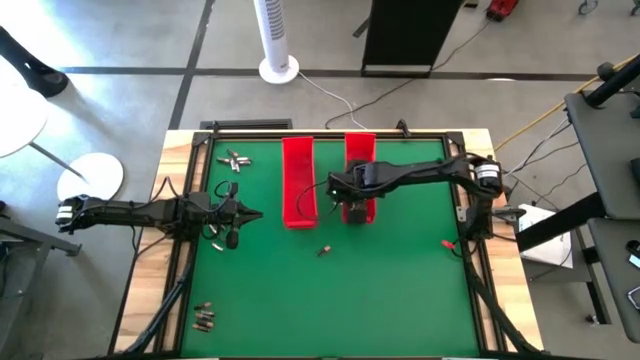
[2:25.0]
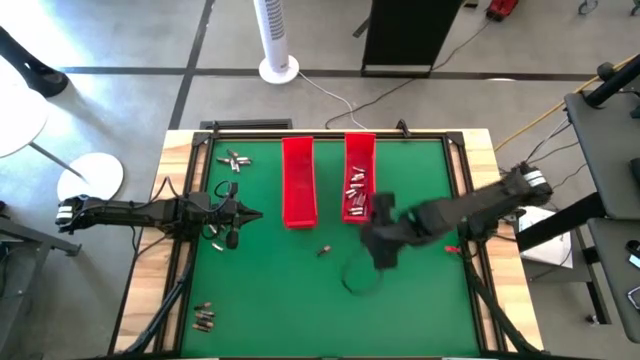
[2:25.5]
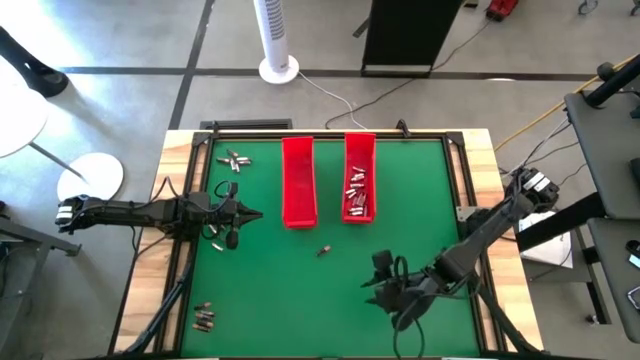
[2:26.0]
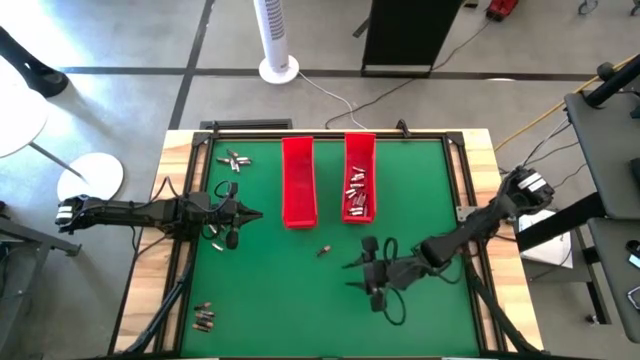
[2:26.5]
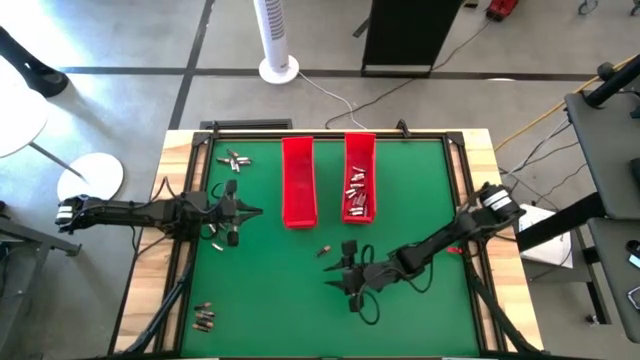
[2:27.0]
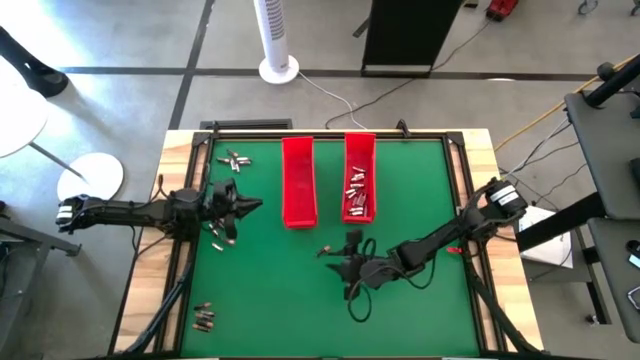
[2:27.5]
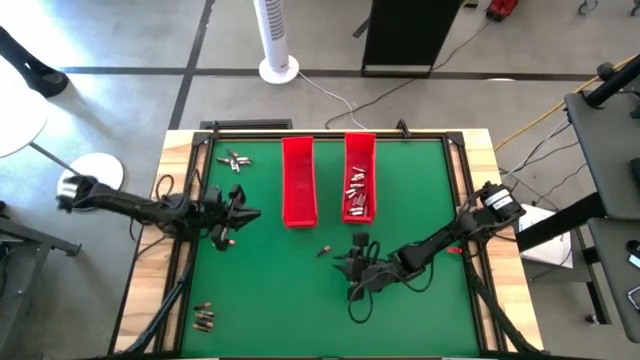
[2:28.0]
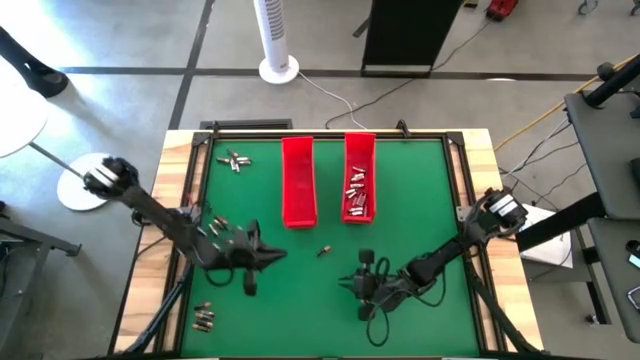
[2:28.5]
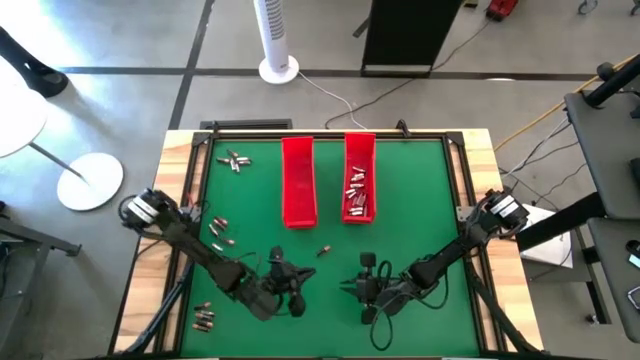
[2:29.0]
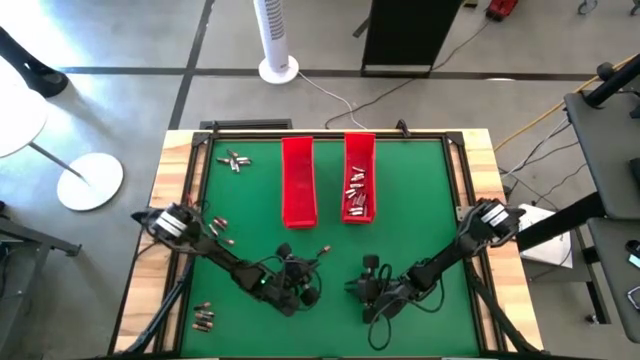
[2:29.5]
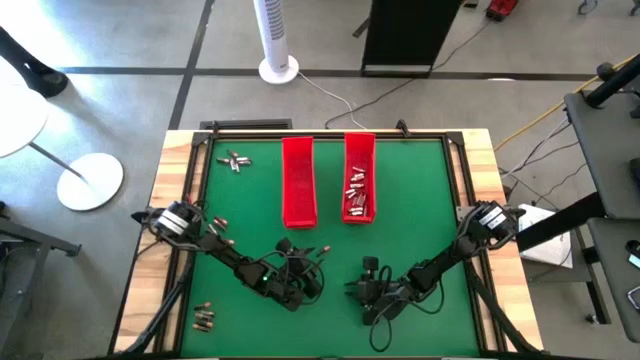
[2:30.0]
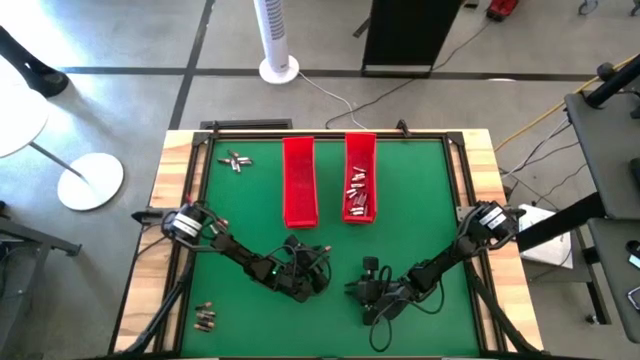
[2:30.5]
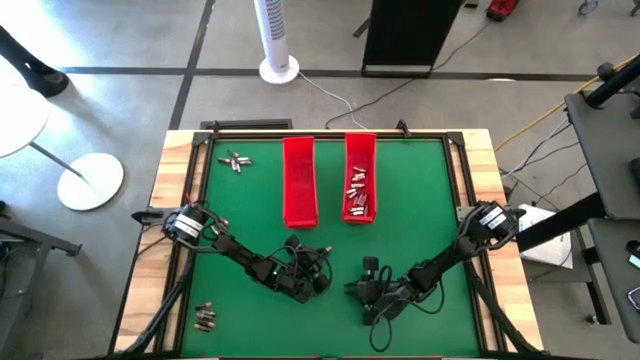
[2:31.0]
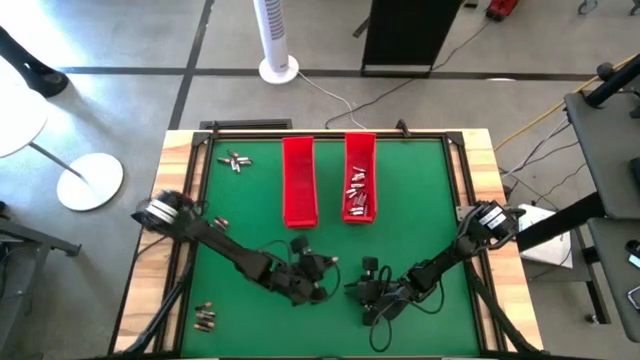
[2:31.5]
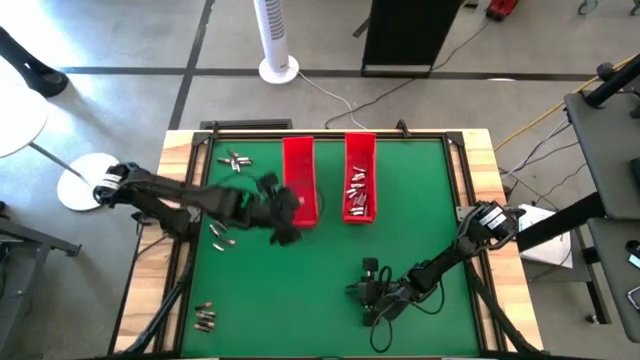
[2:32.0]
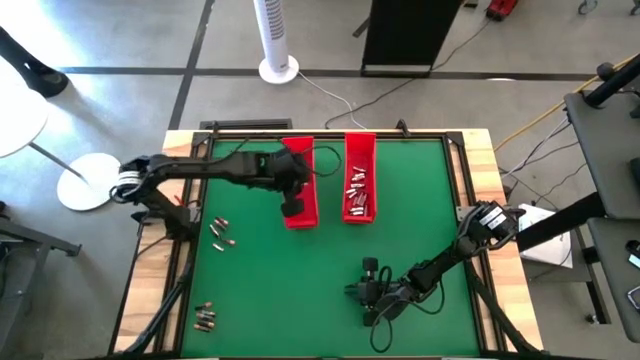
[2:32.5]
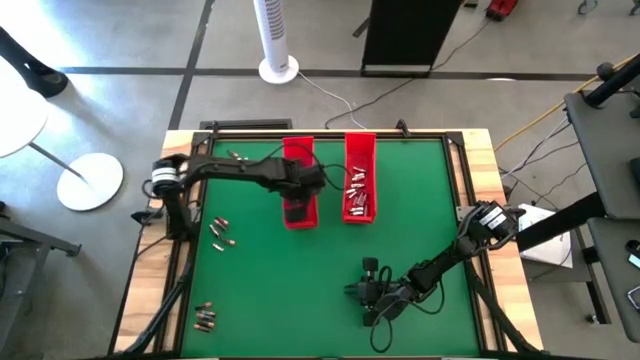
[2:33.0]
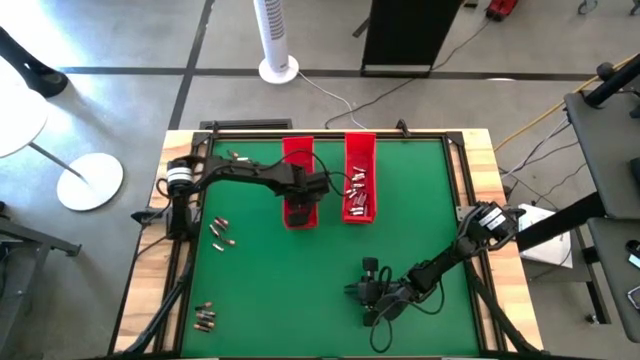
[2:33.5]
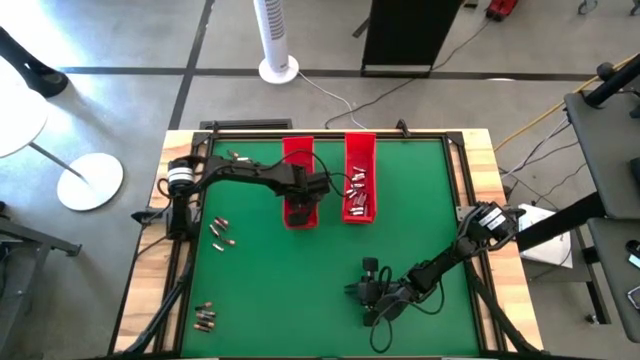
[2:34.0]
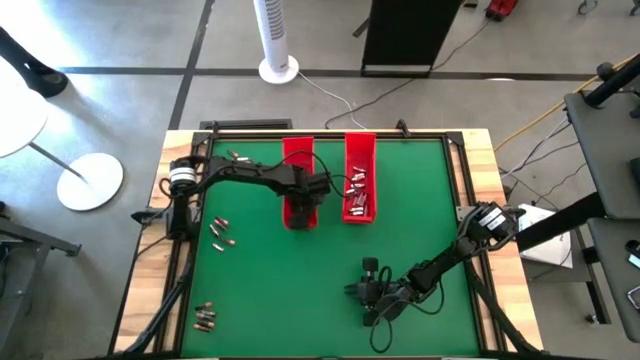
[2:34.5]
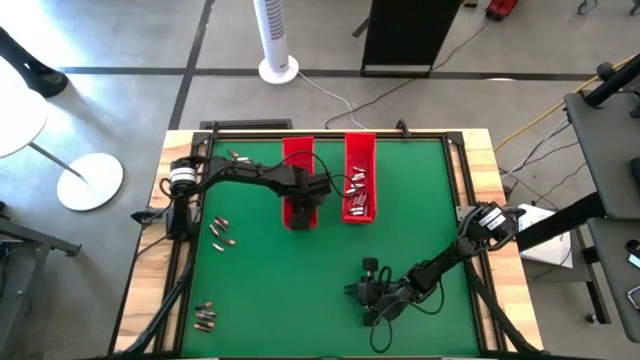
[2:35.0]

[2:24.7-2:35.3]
Task: Sort batteries
Put the black battery into the left red bin

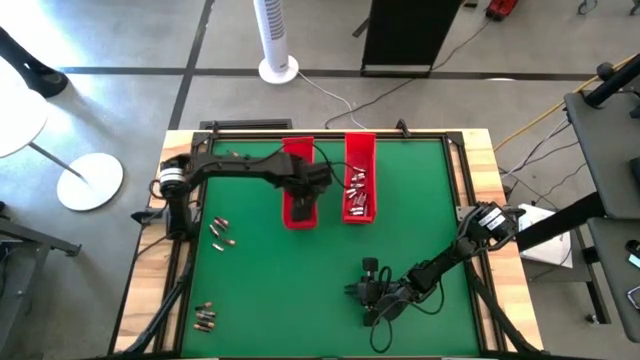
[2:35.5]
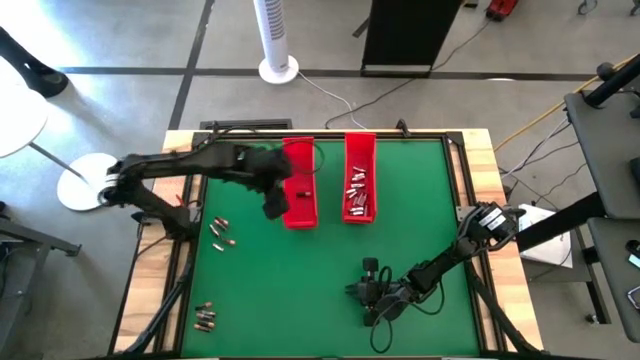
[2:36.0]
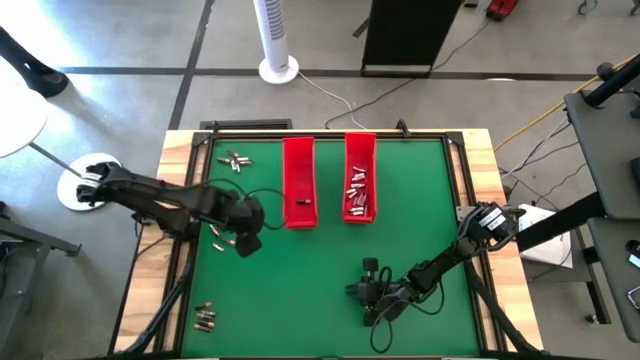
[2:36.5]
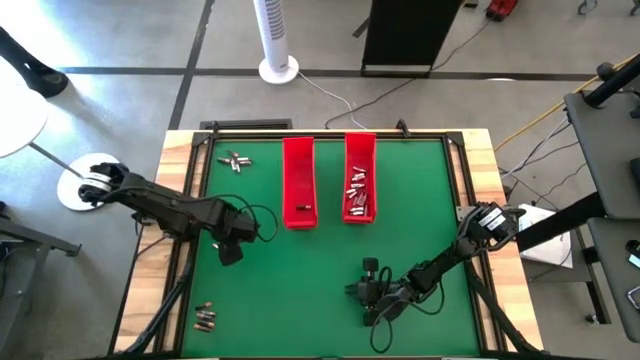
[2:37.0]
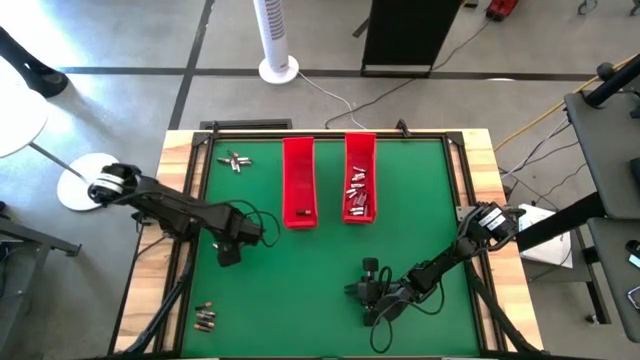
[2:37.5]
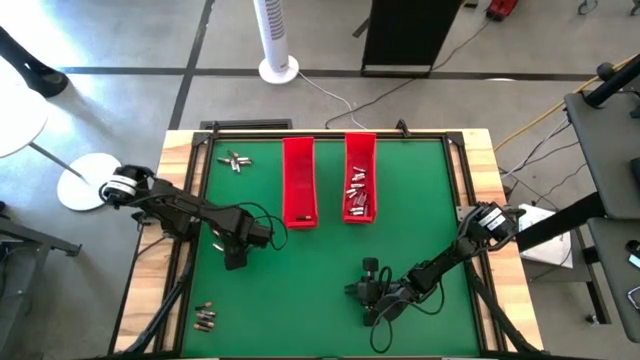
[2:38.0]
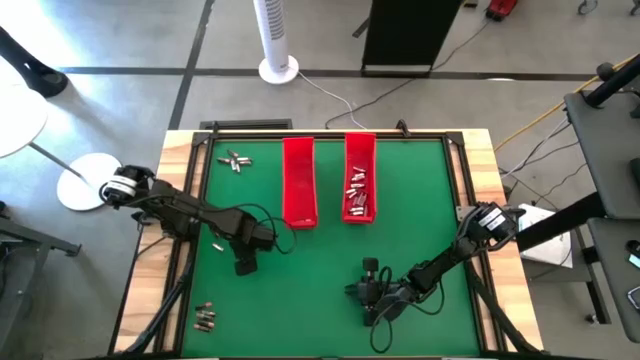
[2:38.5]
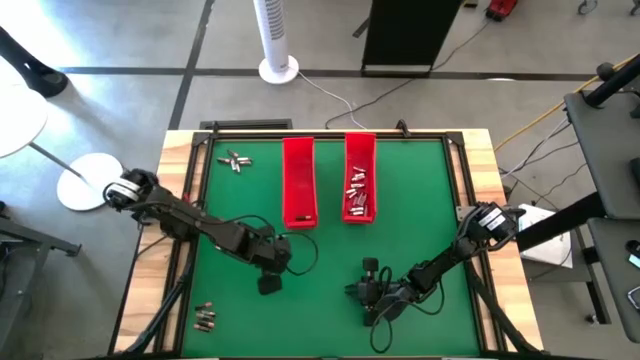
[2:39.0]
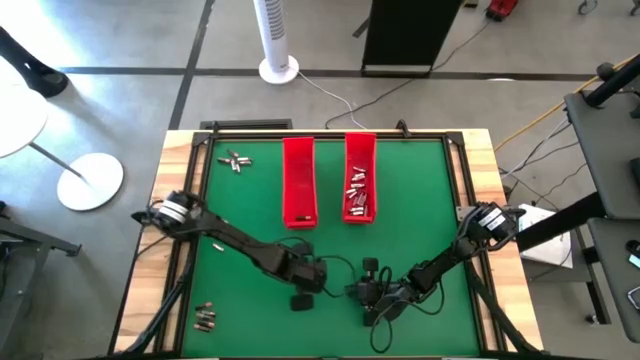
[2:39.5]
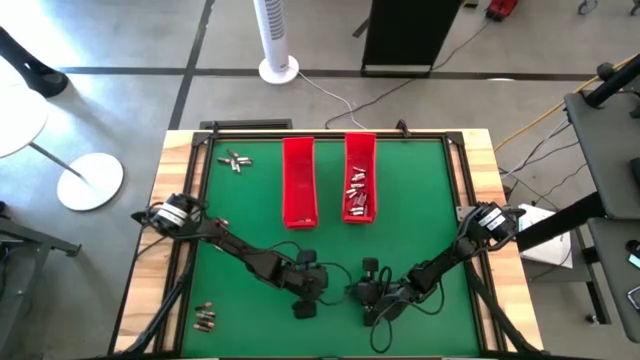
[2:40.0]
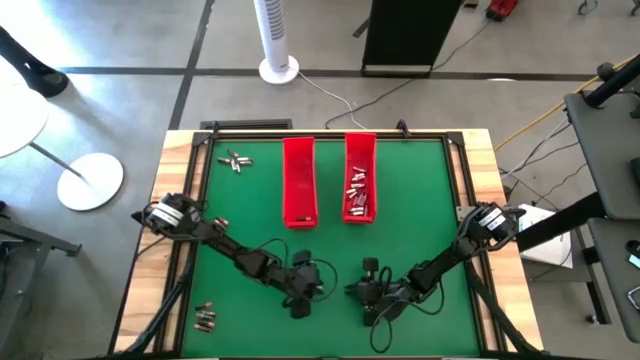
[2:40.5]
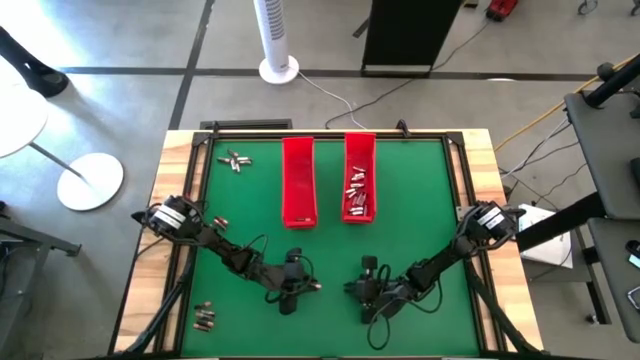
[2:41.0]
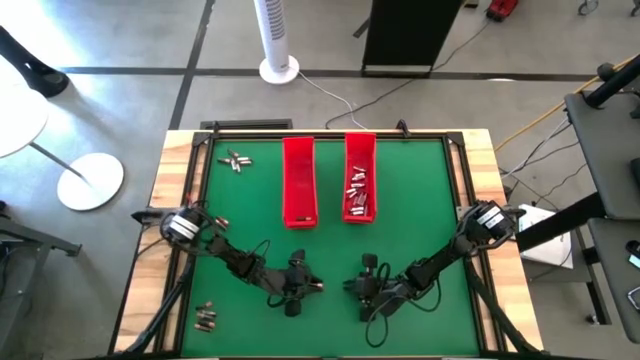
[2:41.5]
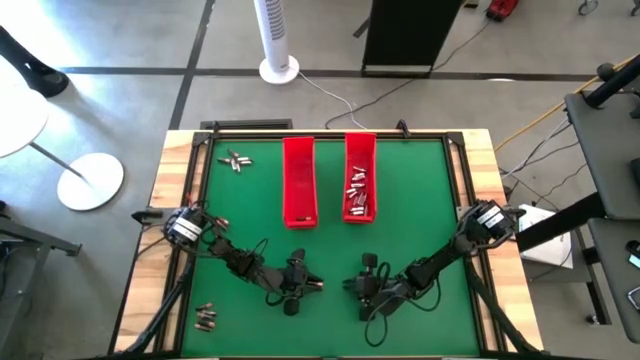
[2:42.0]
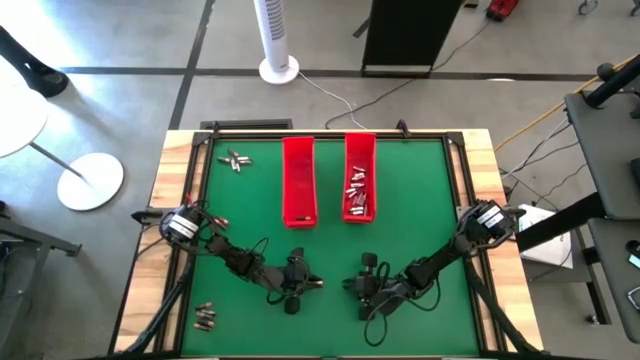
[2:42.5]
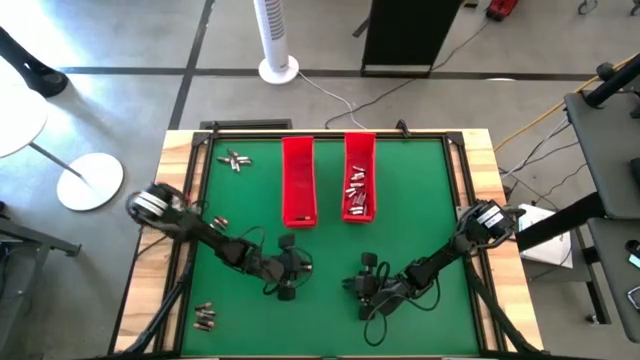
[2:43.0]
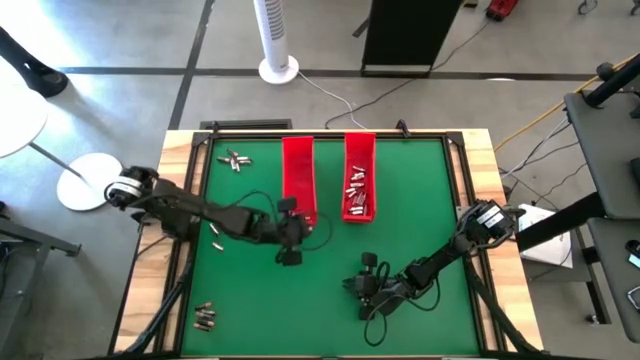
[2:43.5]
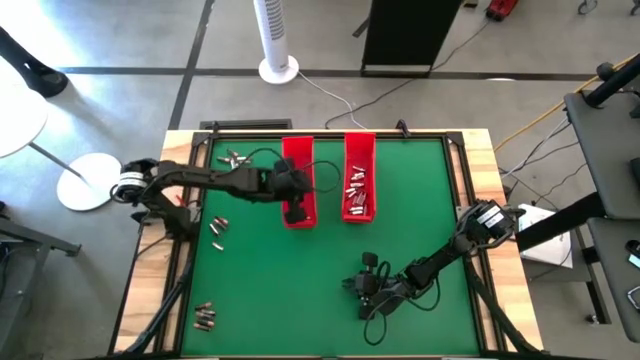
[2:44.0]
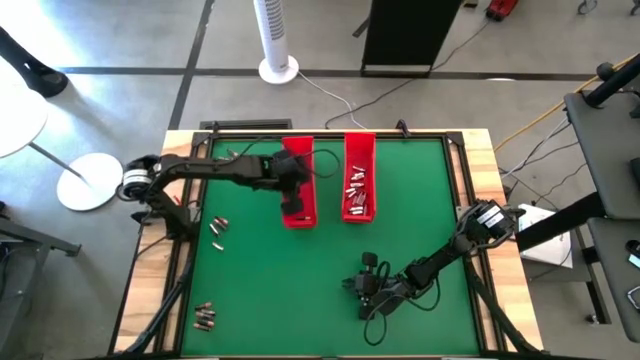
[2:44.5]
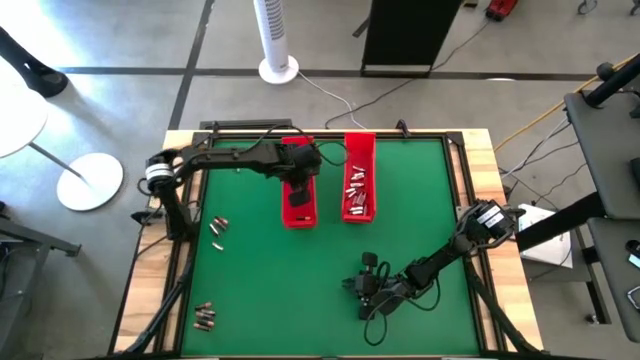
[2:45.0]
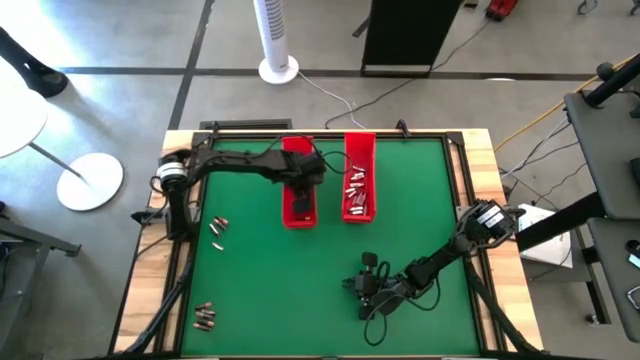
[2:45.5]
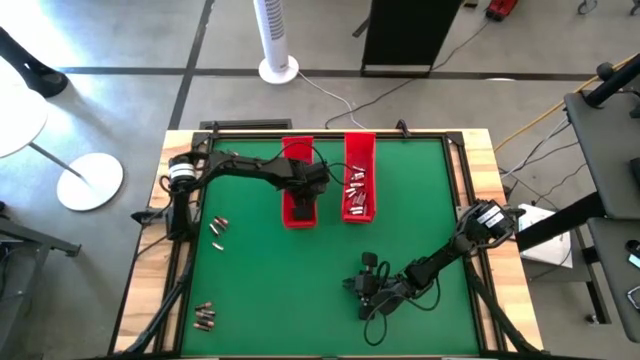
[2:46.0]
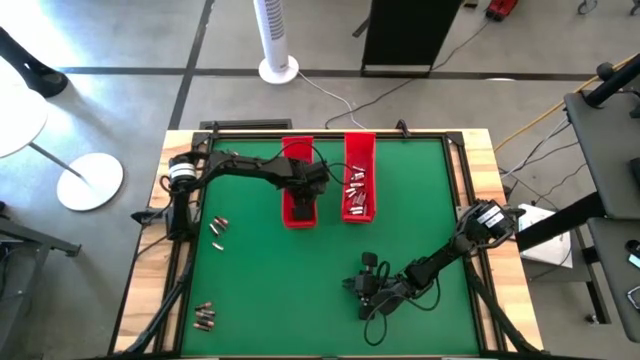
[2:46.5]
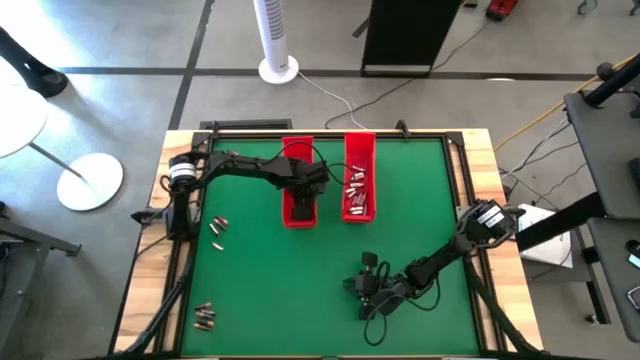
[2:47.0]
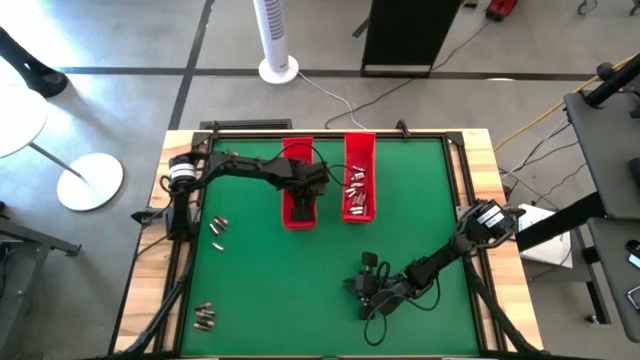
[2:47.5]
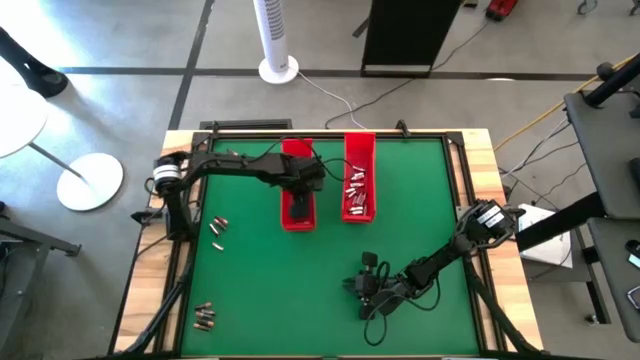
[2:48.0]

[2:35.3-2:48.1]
Put the black battery into the left red bin
